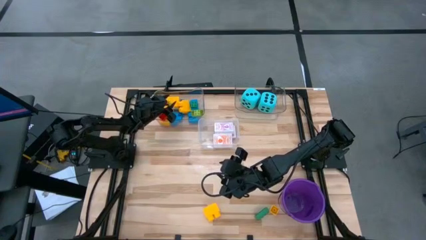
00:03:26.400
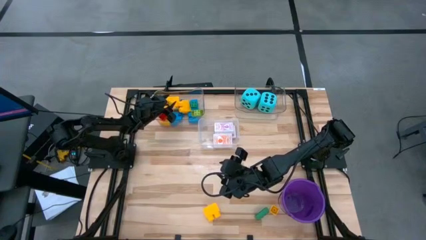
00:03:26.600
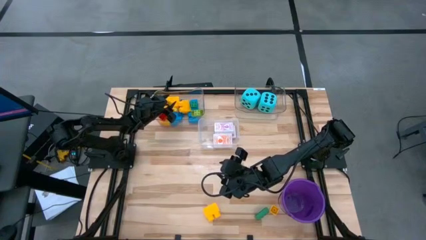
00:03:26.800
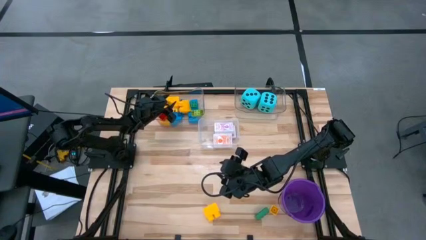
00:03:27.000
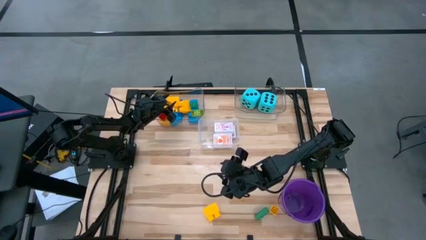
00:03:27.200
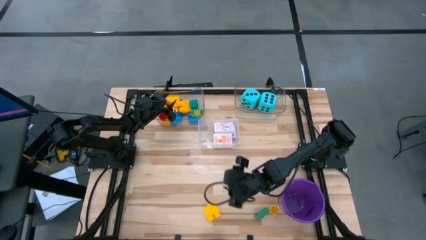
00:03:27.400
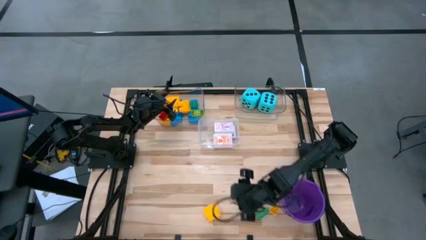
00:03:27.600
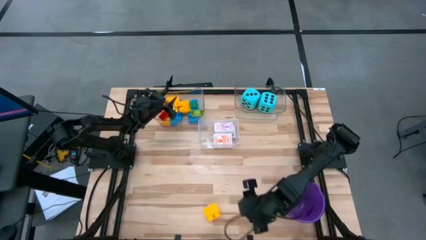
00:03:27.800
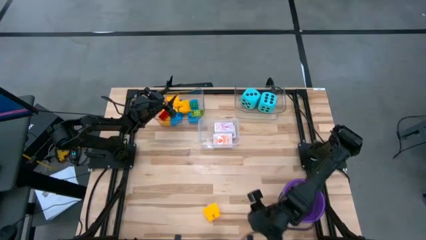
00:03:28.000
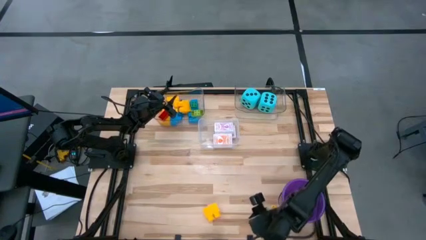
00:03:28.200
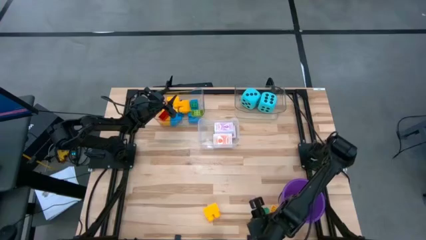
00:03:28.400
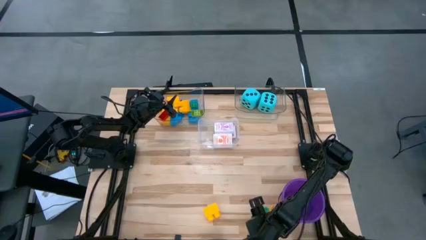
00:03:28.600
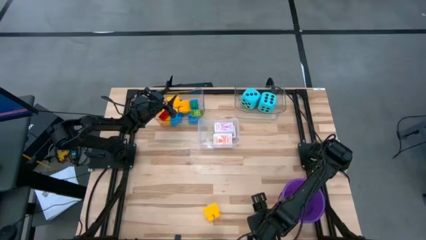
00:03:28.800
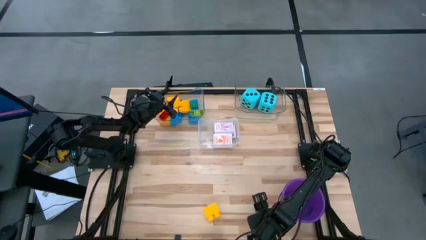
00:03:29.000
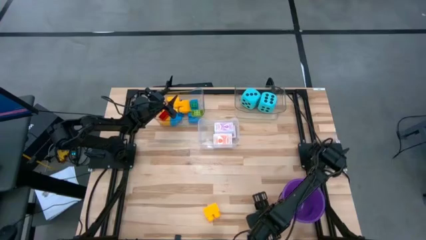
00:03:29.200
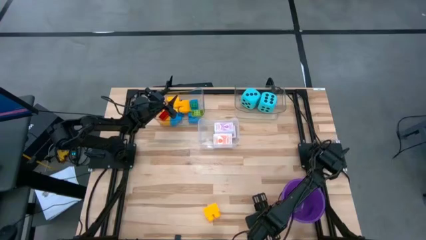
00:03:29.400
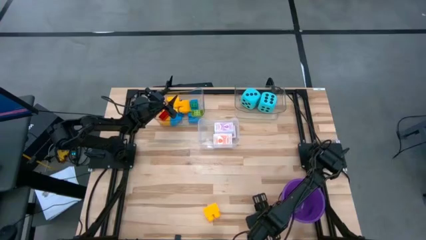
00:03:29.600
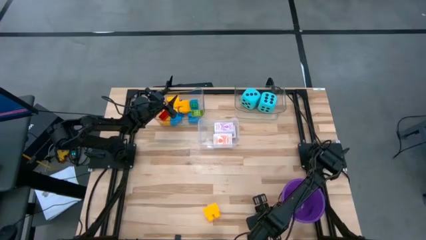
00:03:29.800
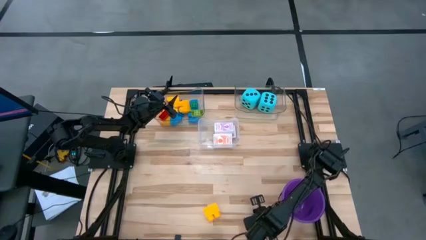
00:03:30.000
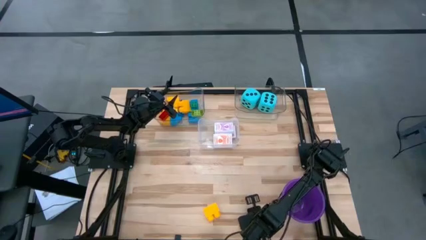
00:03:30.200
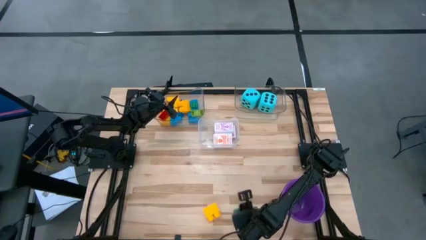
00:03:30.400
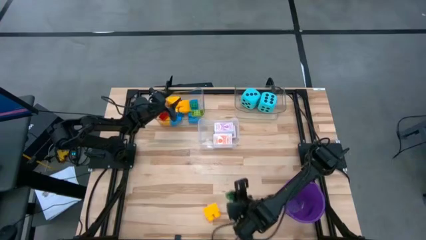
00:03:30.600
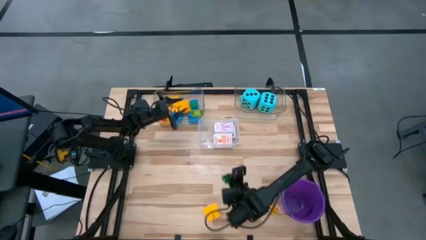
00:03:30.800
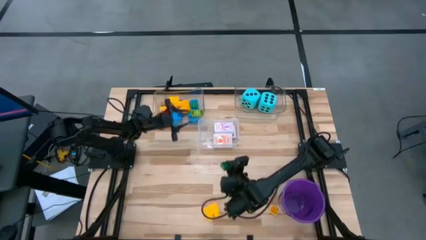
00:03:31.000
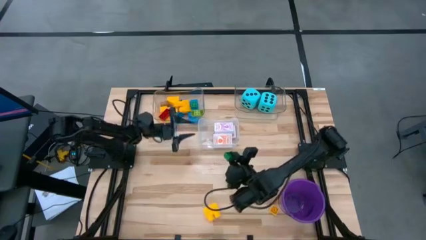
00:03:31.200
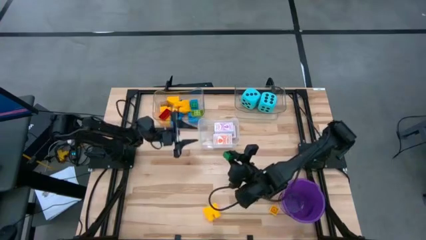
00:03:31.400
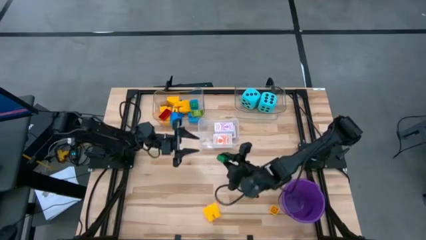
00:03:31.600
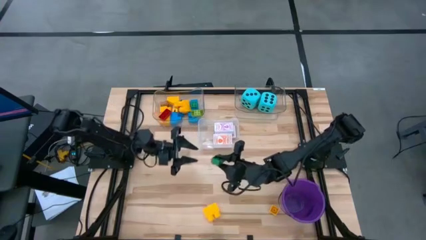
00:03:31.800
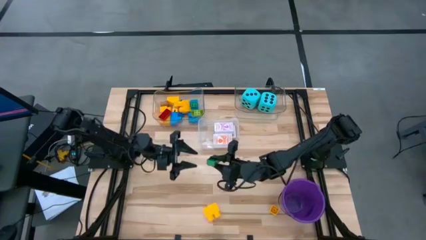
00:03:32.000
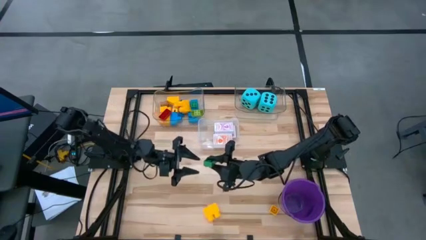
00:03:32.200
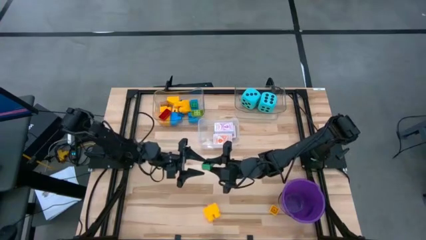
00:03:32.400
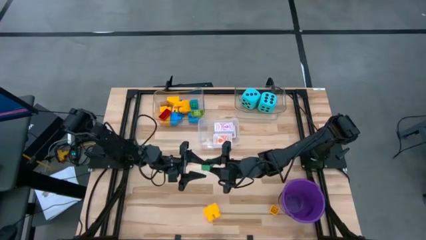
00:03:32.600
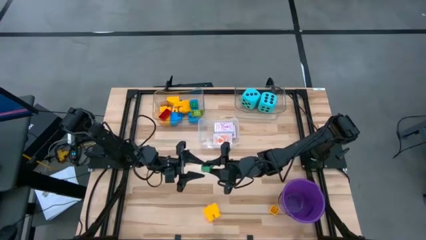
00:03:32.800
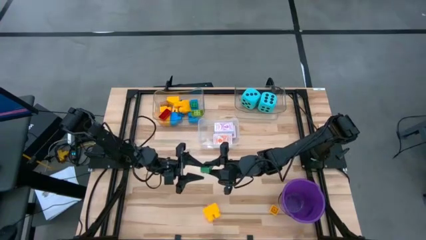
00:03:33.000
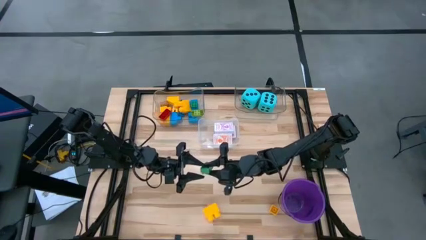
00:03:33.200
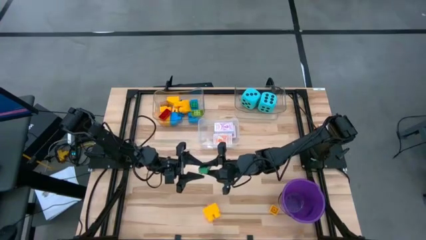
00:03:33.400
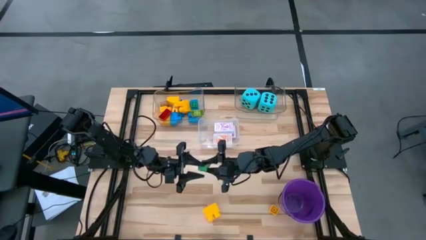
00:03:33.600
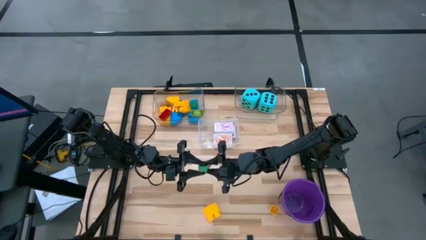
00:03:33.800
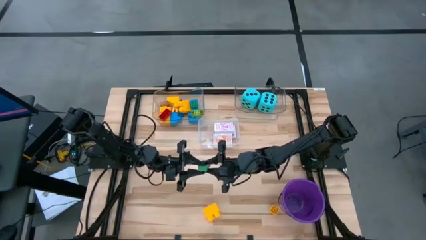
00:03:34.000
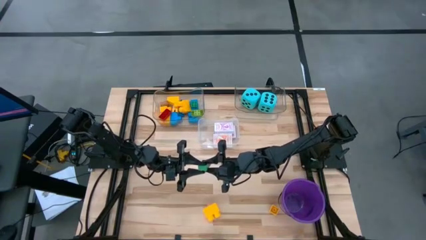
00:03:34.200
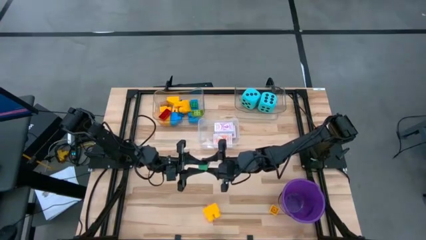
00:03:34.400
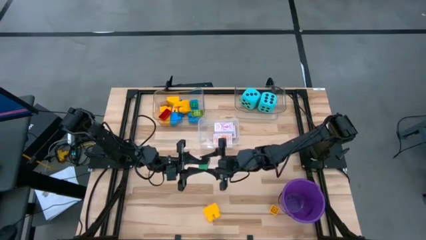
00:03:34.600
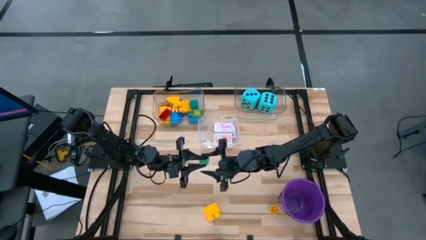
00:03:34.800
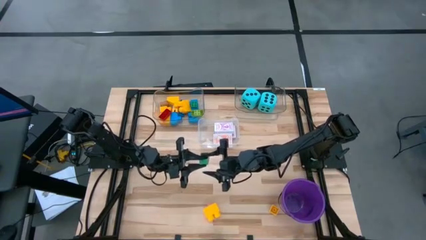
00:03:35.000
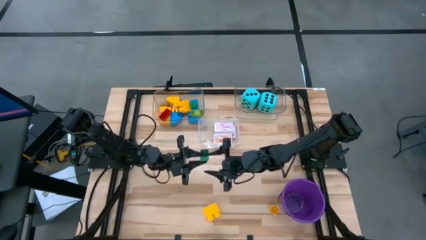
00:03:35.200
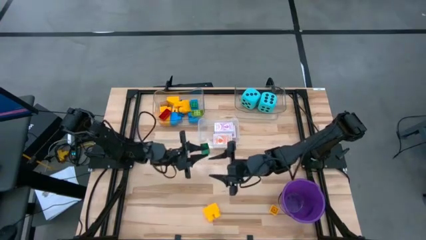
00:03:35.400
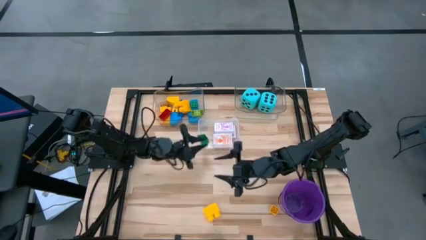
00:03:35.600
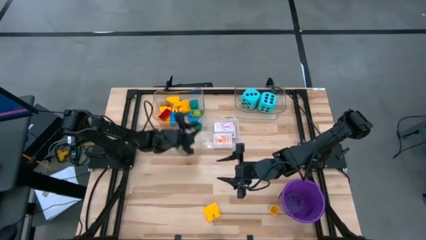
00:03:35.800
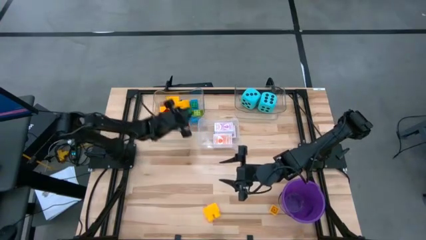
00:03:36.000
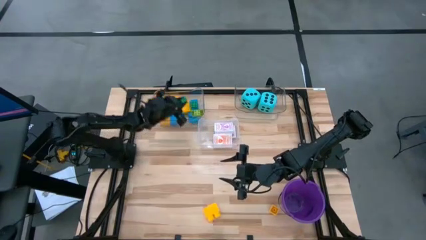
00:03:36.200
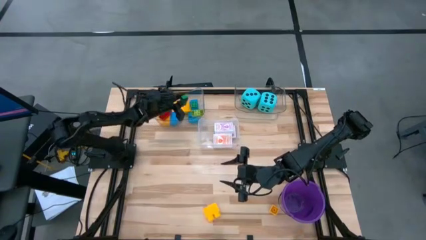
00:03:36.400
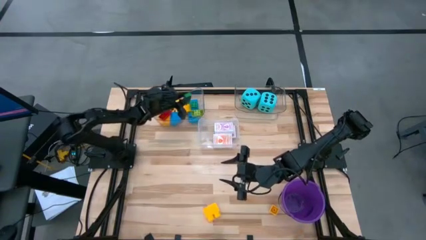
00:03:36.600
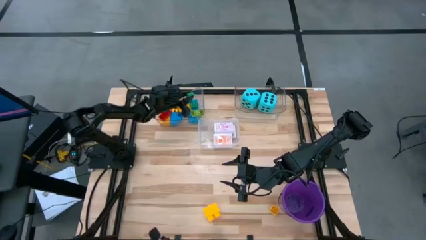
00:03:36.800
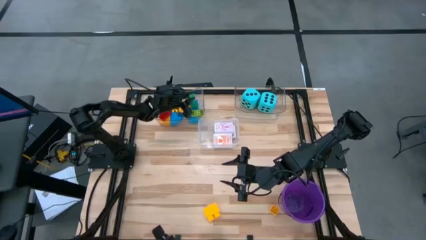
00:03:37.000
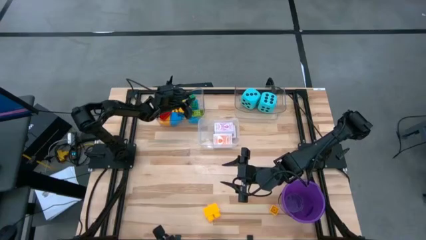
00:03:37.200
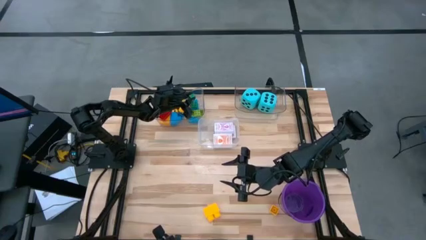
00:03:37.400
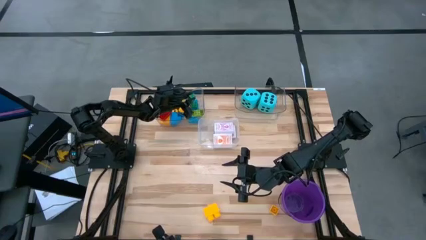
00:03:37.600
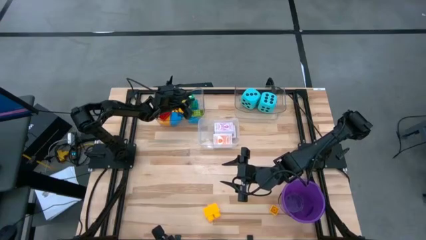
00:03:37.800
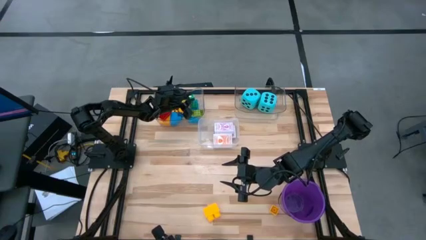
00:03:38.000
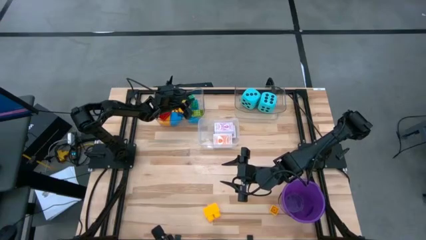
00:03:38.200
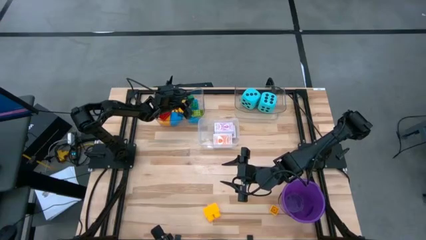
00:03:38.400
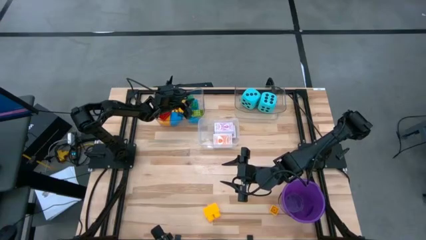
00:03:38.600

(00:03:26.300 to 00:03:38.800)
Task: Pick & Place Toys
Put the green game piece into the top left transparent bin

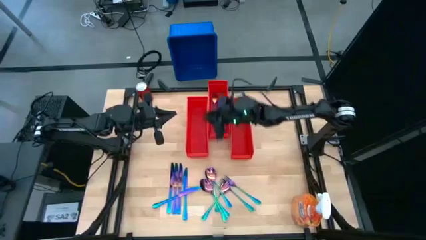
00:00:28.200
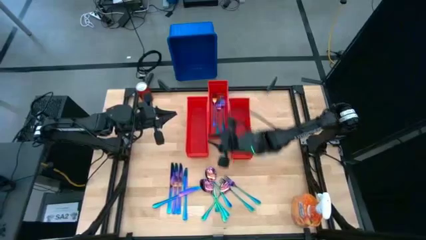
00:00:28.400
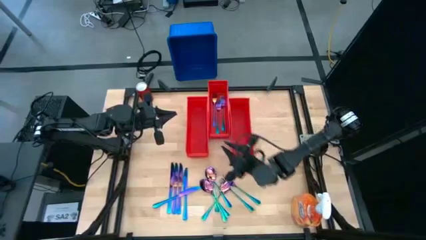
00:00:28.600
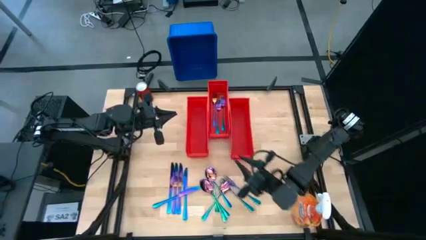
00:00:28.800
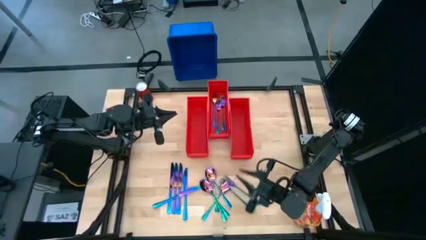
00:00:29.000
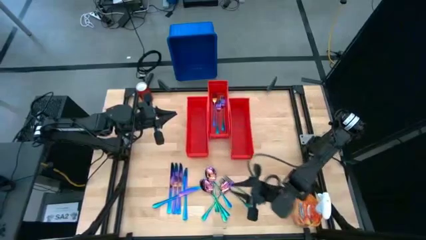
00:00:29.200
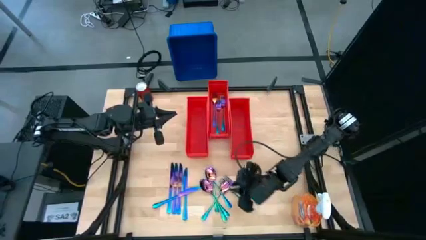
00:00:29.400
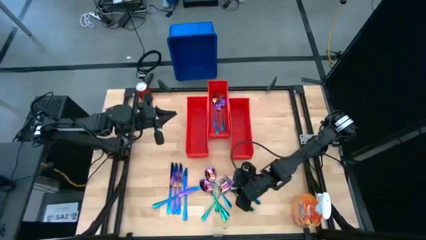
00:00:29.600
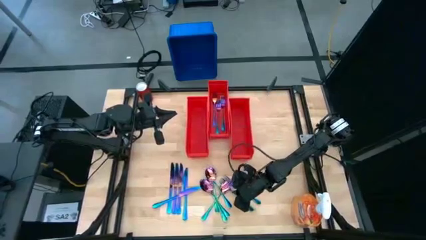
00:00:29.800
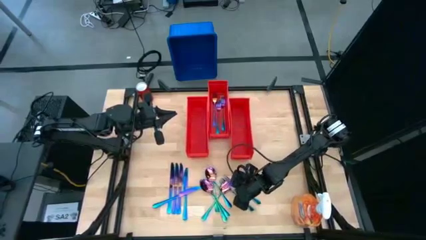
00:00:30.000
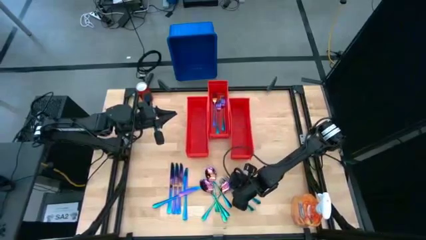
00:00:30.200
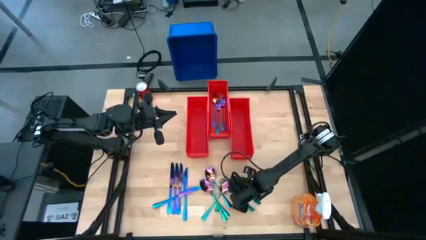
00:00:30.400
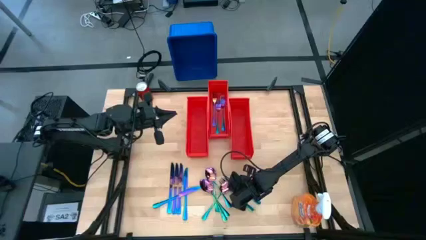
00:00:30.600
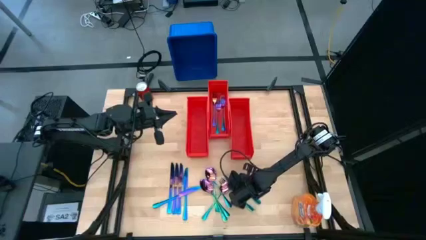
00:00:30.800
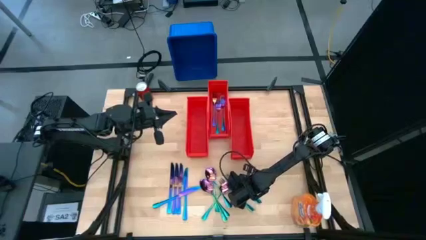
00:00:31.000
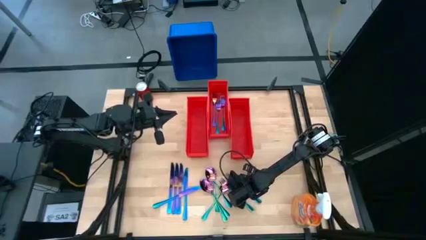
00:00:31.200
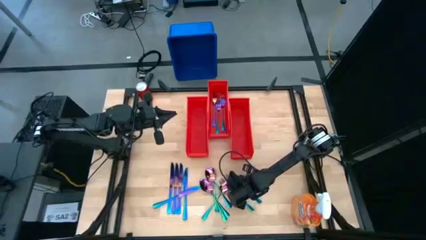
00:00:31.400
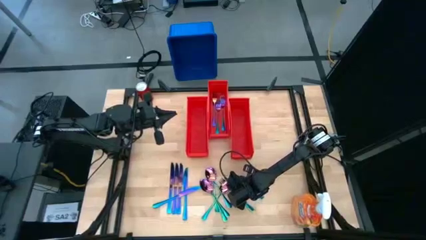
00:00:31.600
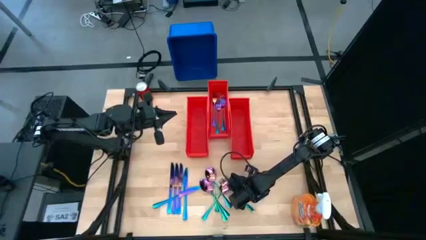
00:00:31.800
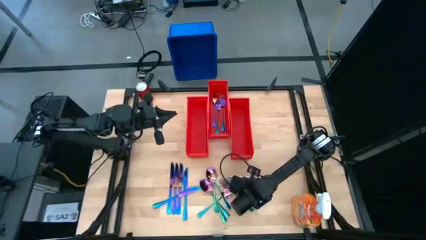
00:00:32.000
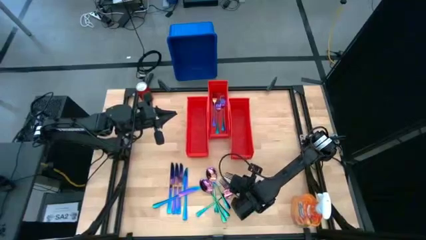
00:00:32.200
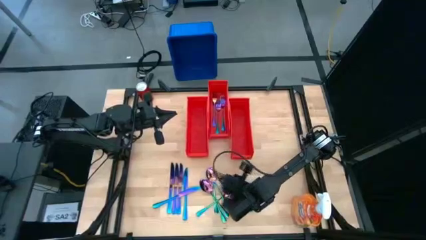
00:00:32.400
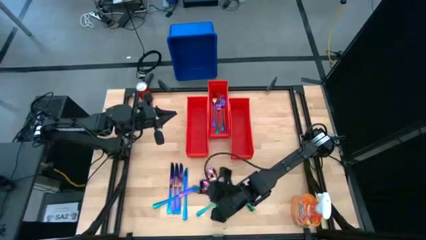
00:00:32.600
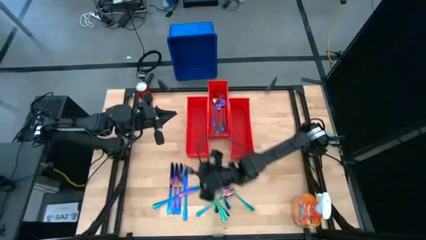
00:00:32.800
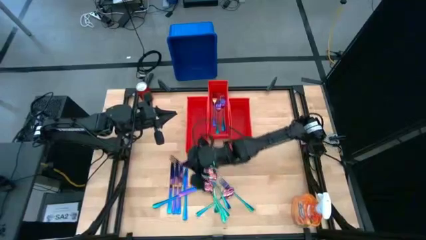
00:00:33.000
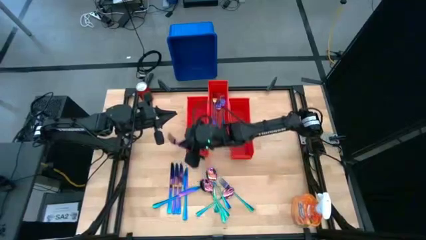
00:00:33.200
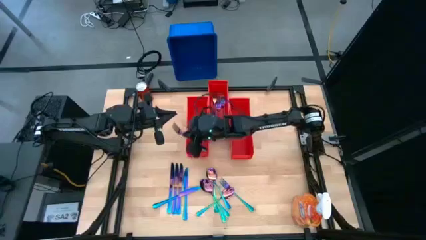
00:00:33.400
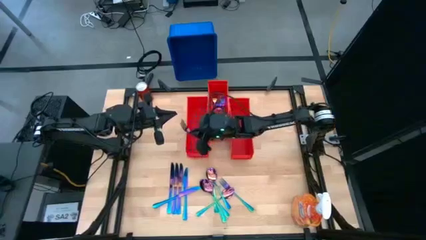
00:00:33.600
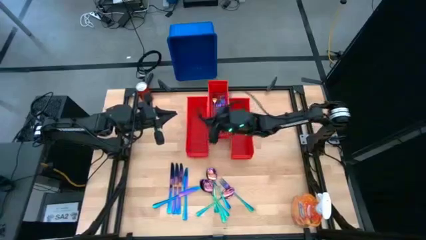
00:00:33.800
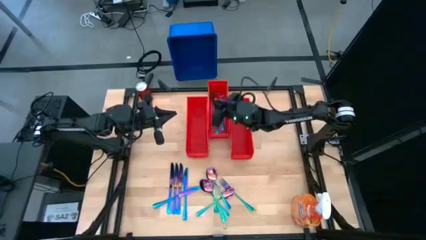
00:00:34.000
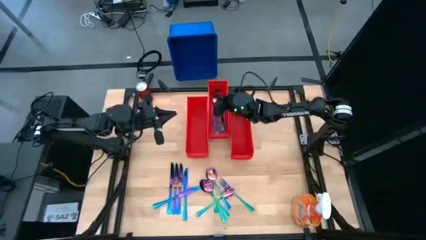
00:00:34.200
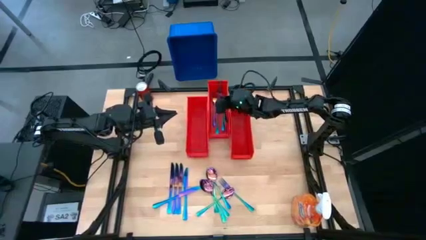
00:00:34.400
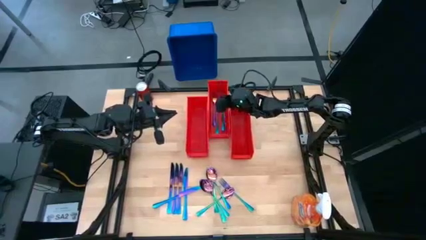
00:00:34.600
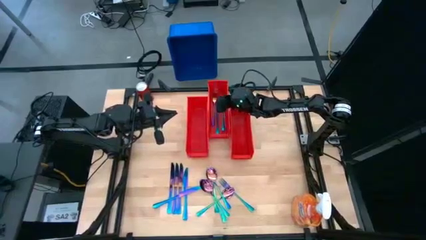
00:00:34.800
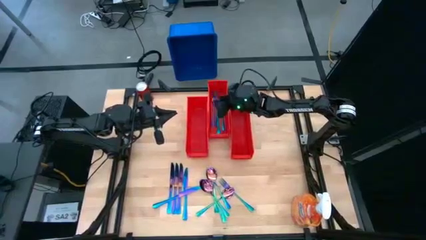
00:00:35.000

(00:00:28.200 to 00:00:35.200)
Task: Sort silverware
Put the iridescent fork into the middle orange bin
